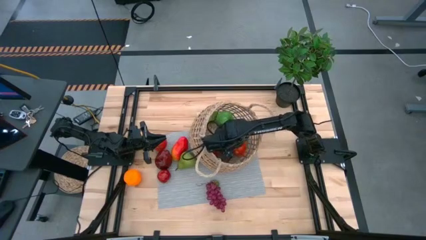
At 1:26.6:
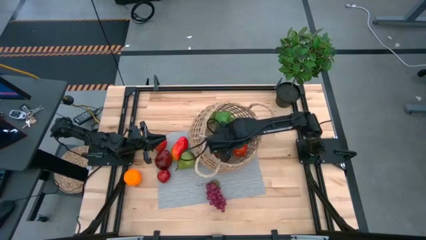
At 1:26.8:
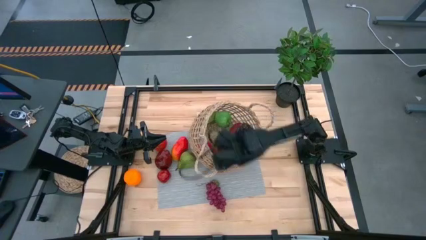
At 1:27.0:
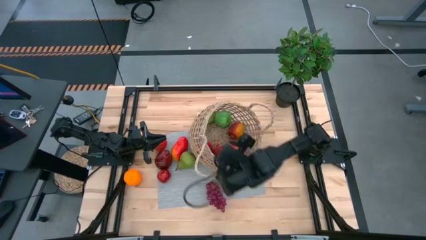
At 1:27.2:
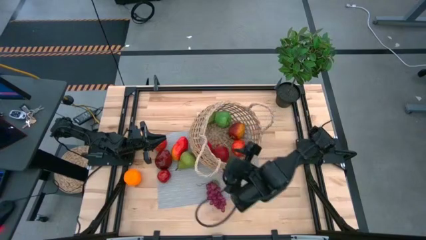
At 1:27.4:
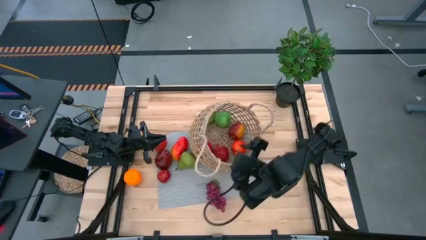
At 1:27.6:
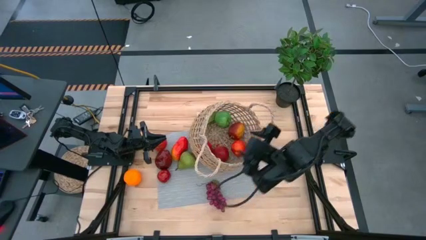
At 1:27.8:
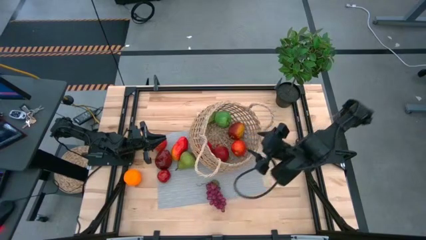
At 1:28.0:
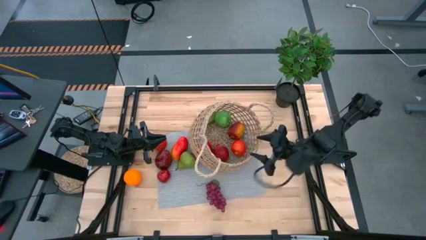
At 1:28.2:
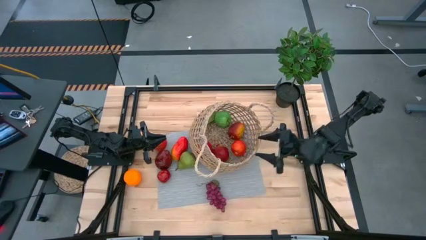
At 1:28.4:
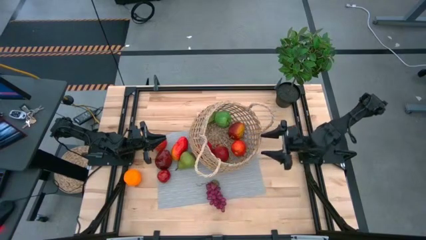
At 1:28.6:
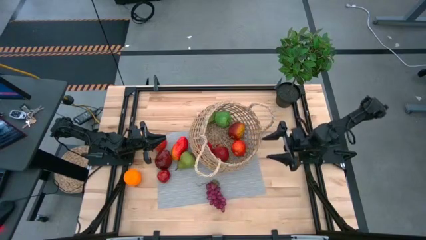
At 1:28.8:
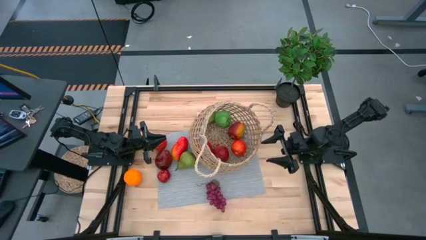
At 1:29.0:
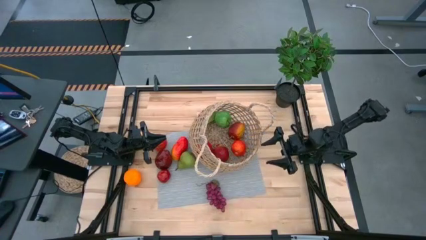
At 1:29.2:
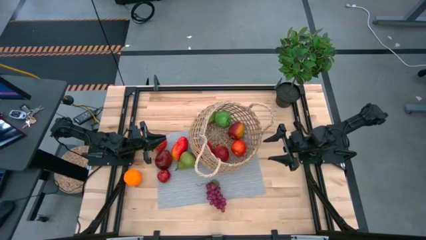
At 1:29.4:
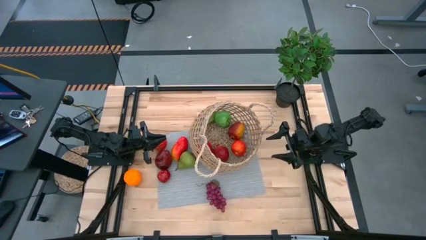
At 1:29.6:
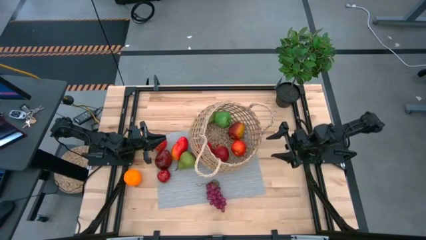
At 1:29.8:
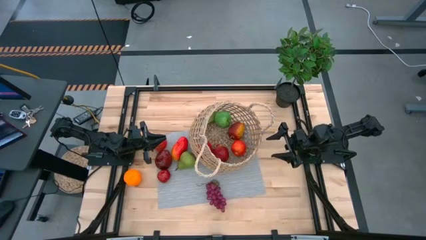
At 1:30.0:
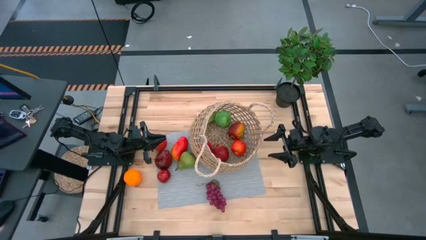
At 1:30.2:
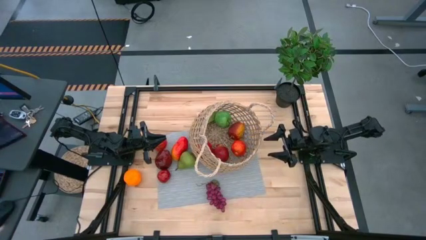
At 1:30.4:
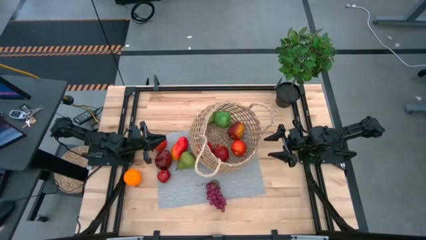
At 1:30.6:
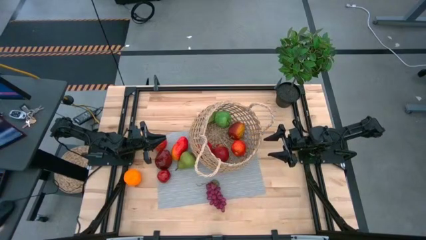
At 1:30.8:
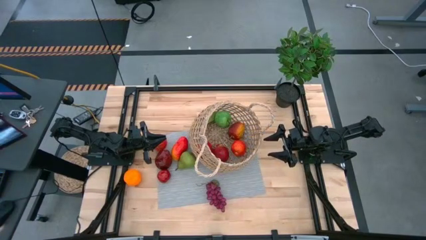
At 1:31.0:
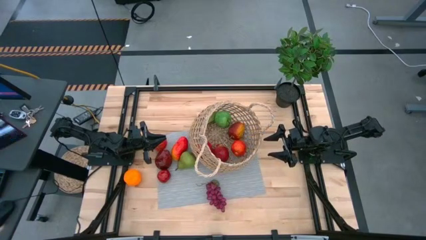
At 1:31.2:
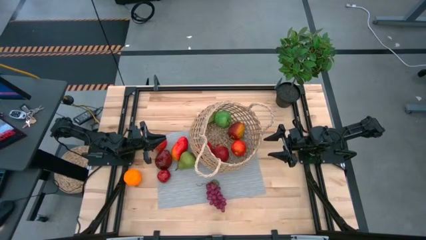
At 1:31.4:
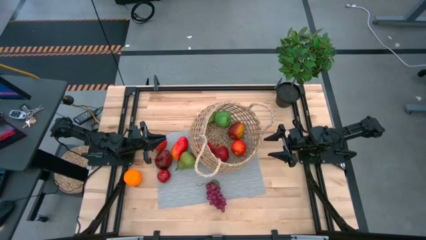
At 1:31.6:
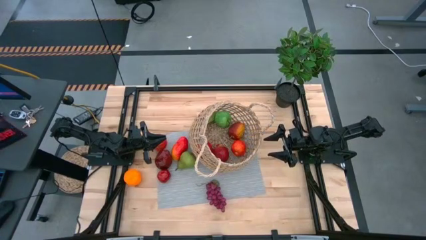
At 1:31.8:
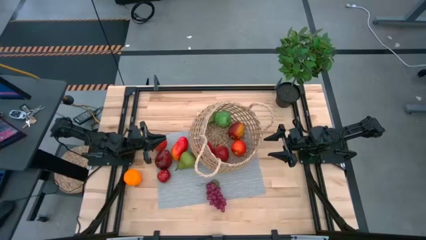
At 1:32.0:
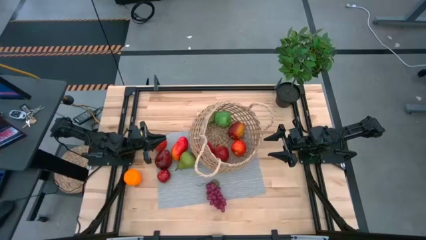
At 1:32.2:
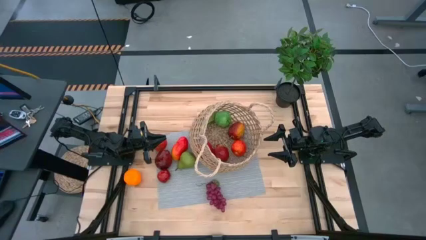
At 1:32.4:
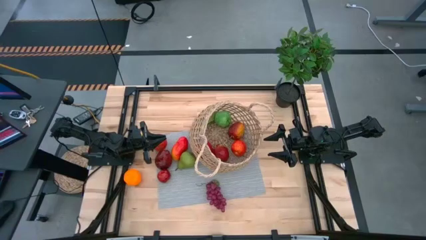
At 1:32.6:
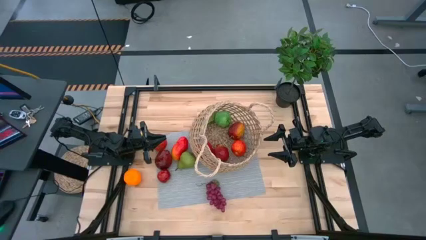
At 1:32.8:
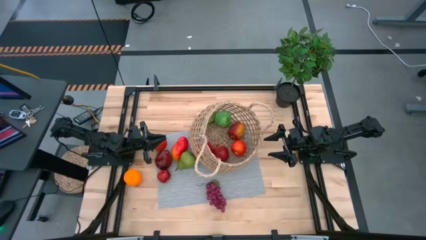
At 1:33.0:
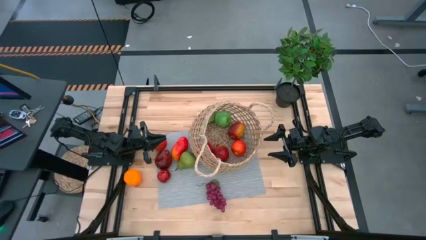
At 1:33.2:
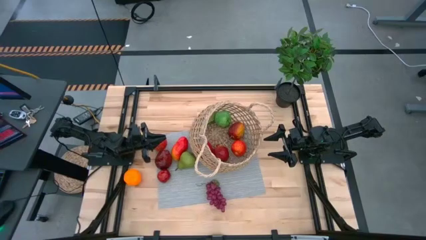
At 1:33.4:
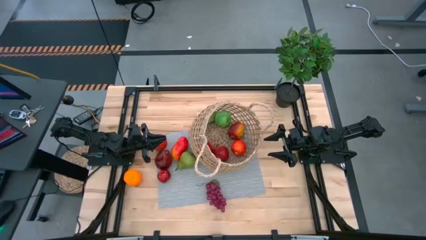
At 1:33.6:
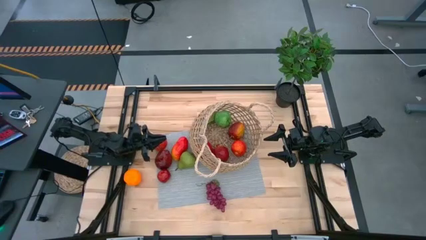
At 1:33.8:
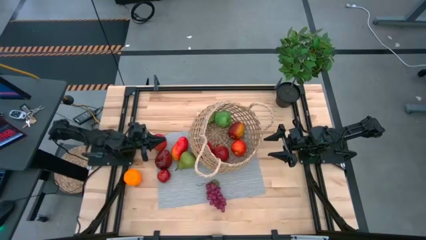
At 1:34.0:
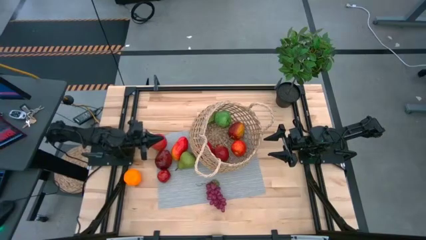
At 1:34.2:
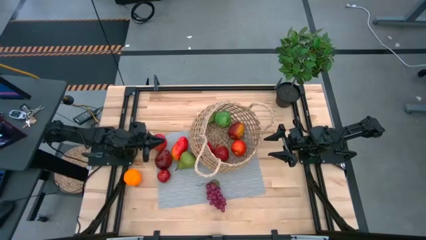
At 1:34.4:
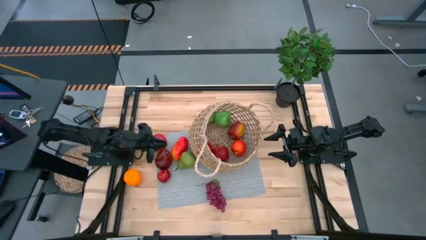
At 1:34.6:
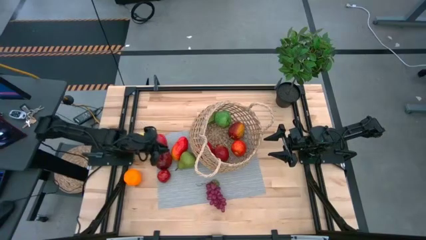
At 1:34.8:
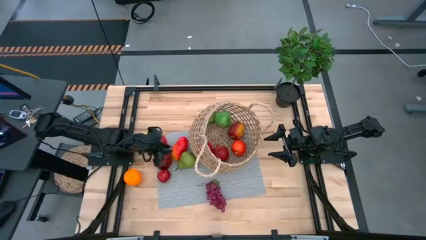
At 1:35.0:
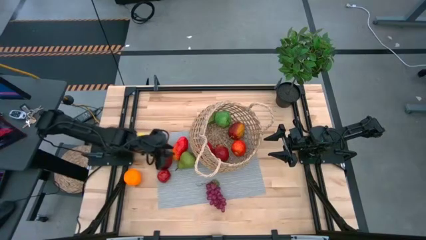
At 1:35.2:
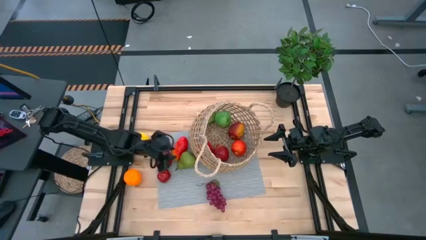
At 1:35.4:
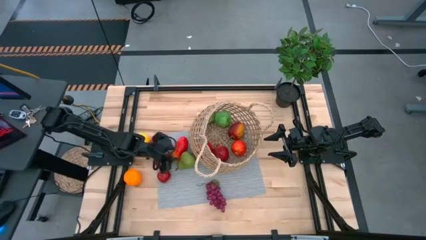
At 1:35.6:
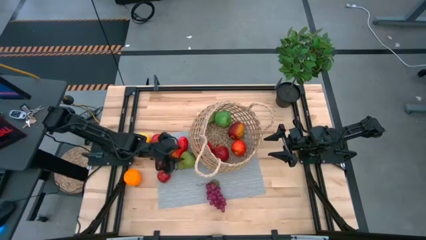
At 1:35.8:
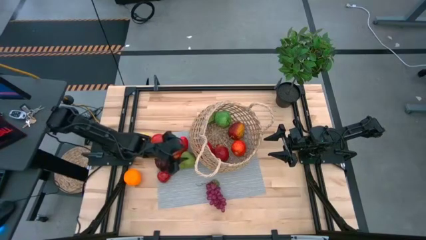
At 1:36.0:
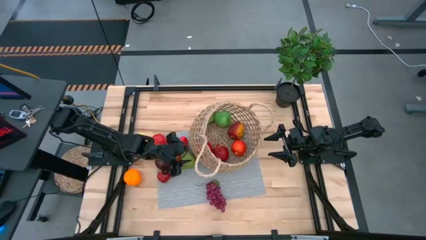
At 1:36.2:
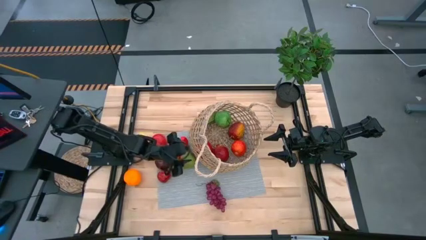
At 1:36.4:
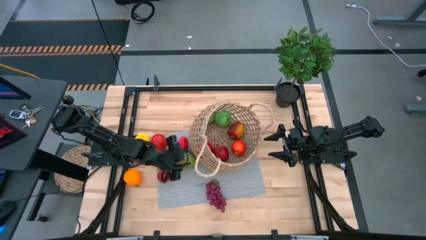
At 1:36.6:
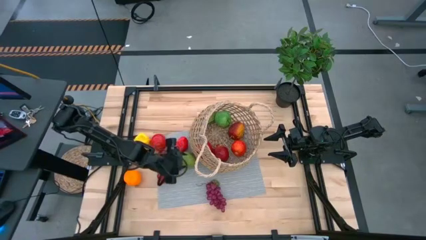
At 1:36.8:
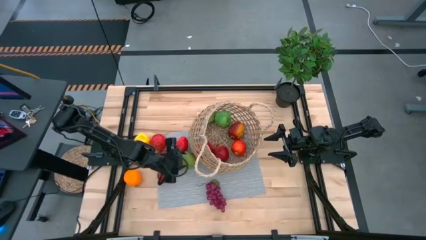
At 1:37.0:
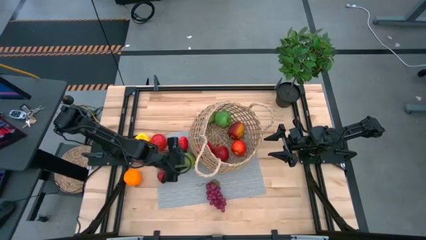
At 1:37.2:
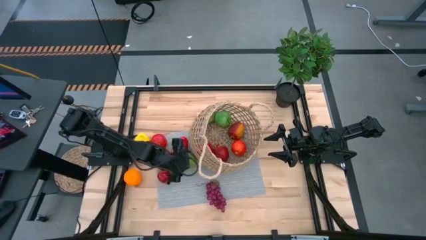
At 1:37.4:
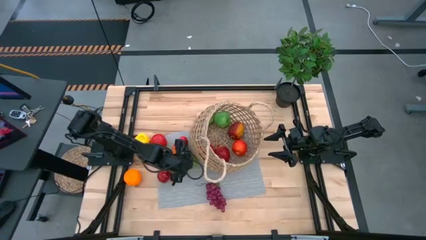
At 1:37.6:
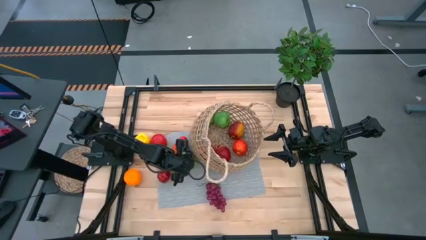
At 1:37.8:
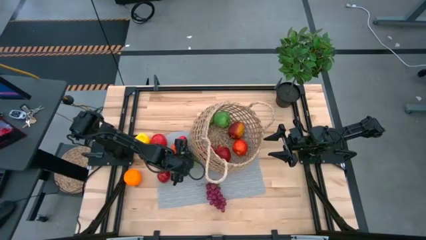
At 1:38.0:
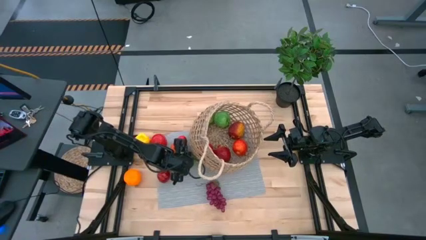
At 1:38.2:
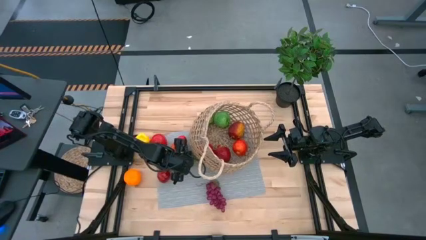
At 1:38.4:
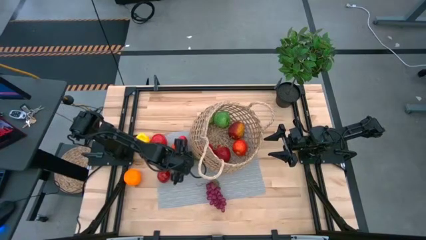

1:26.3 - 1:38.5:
Task: Build produce basket
Put the pear into the brown basket

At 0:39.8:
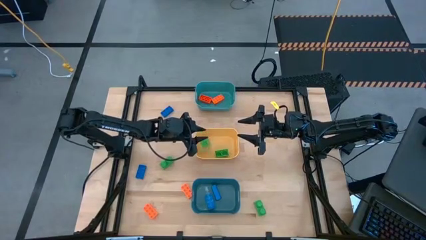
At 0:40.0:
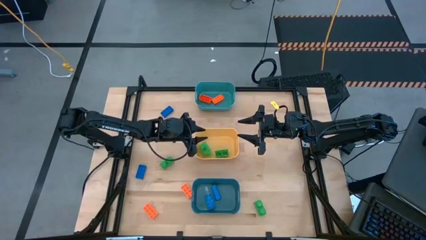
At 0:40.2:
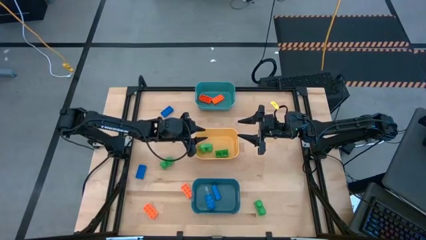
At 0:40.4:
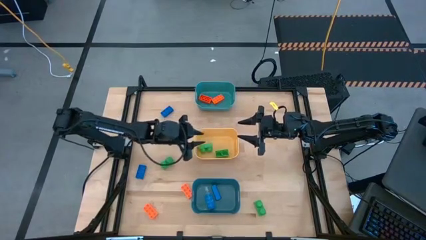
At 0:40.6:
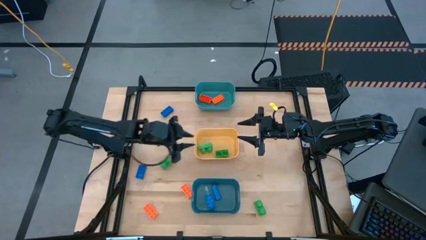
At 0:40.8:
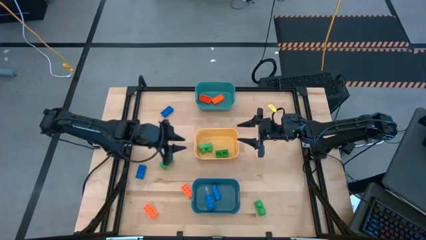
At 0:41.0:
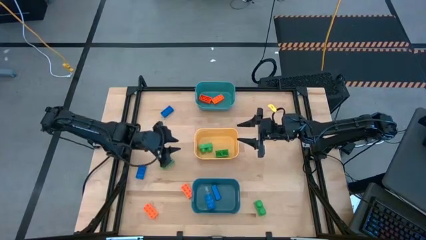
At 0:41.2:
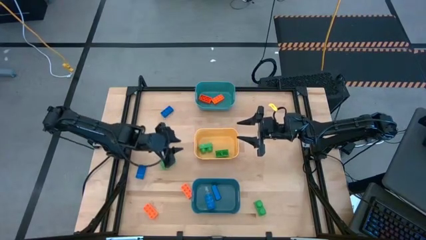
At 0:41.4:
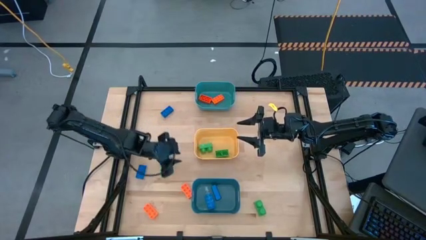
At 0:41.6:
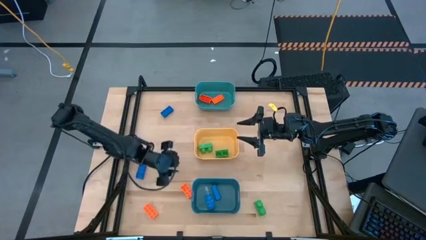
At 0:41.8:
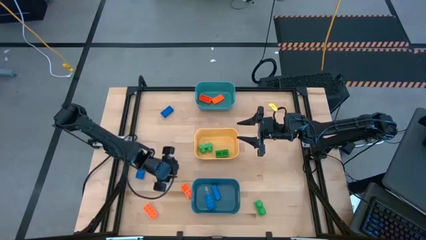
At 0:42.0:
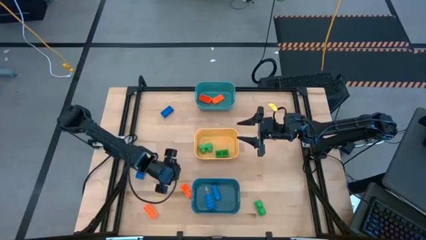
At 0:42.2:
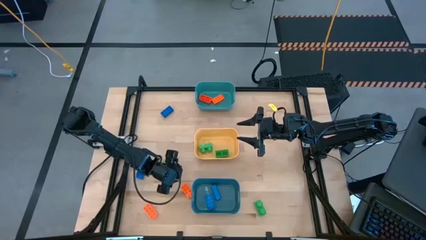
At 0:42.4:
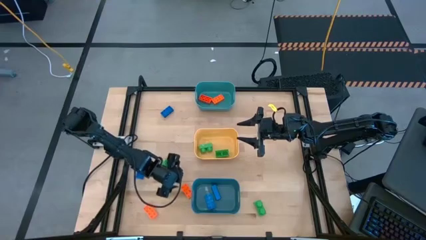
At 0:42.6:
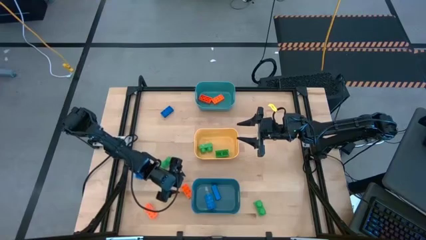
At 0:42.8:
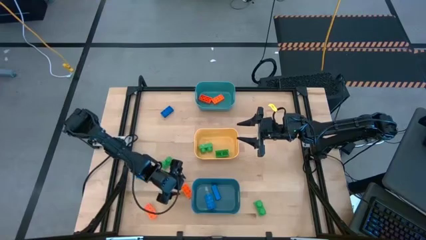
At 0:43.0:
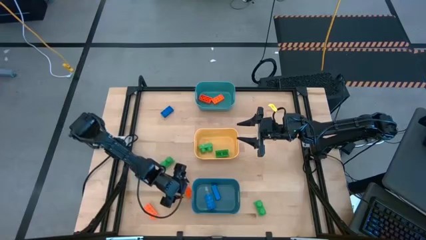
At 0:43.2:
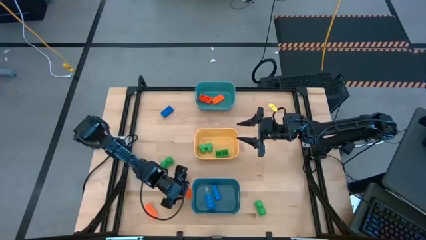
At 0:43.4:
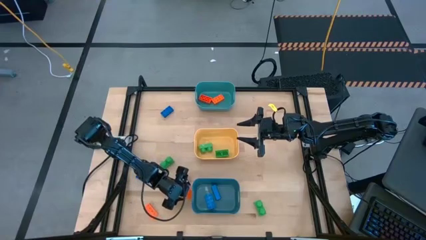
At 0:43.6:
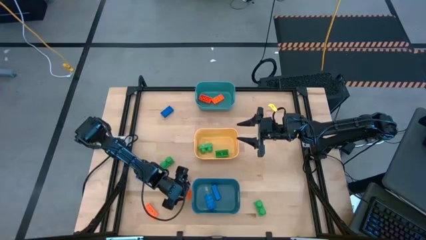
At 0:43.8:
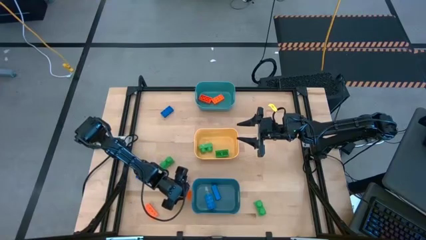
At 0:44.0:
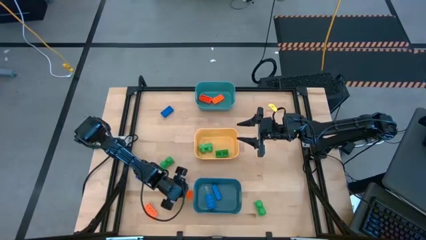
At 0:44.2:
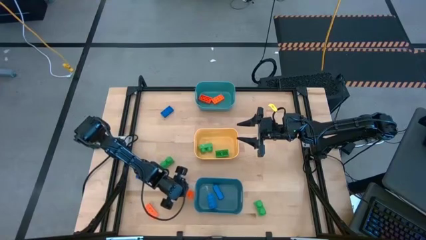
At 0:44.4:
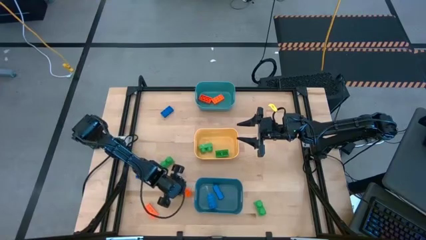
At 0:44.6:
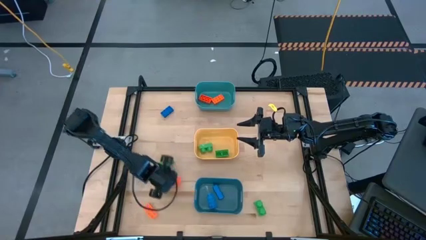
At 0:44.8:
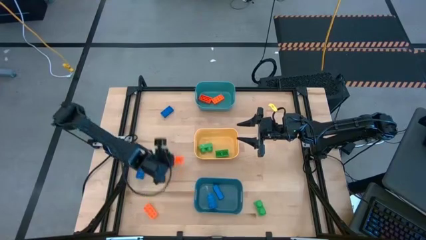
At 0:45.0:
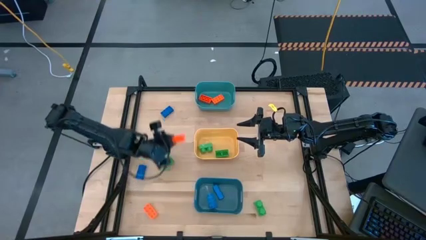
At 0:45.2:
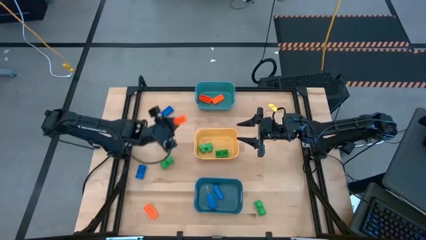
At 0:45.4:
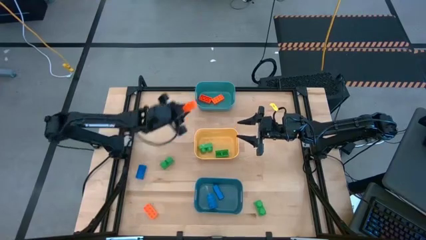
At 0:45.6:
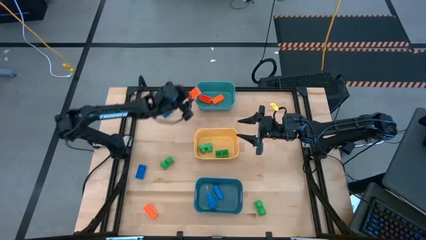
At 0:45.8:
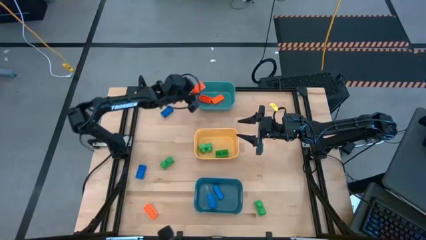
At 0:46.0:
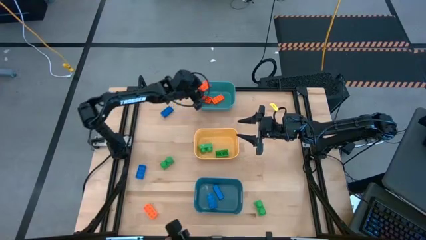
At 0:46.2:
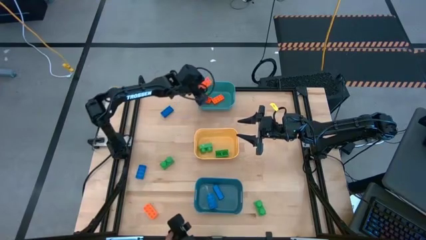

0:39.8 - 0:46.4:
Task: Sort & place blocks by color
Put the orange game piece into the green bin
